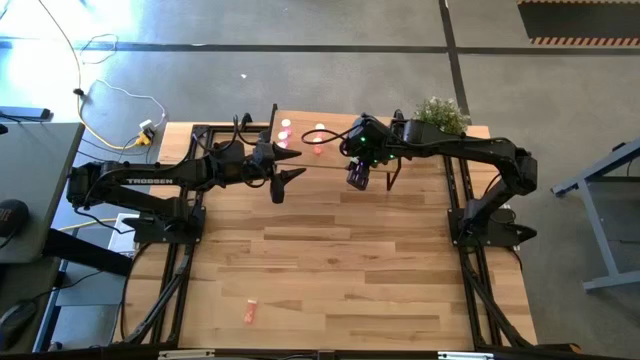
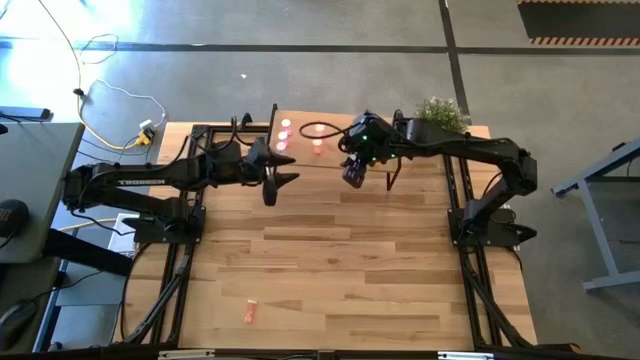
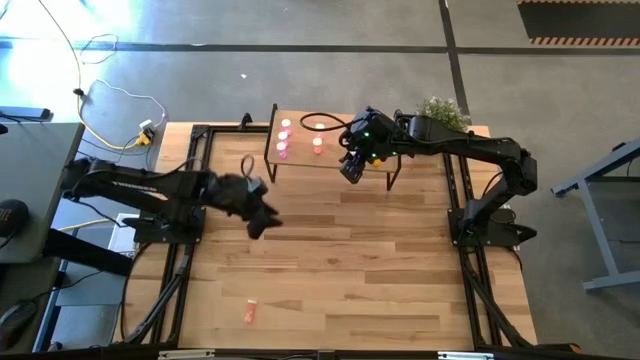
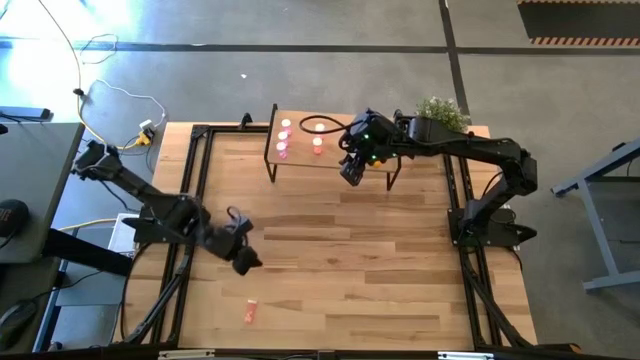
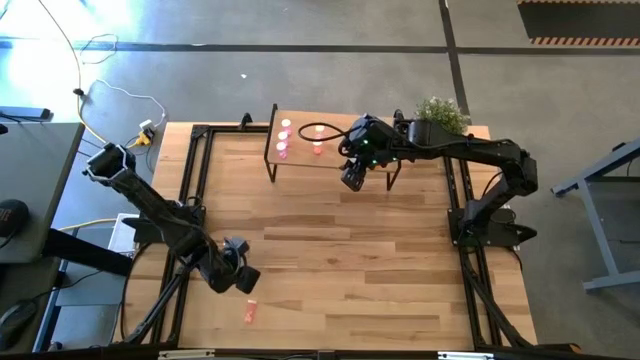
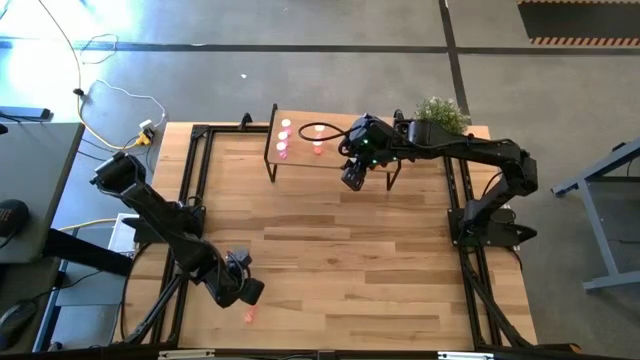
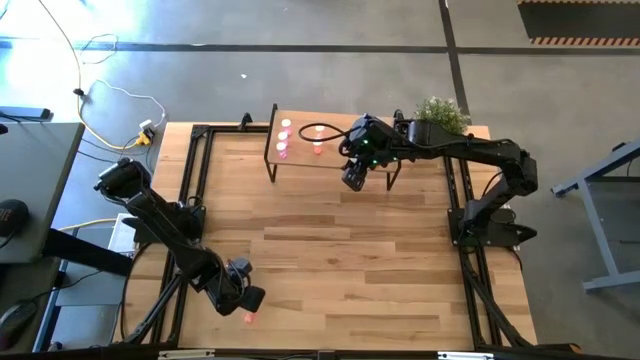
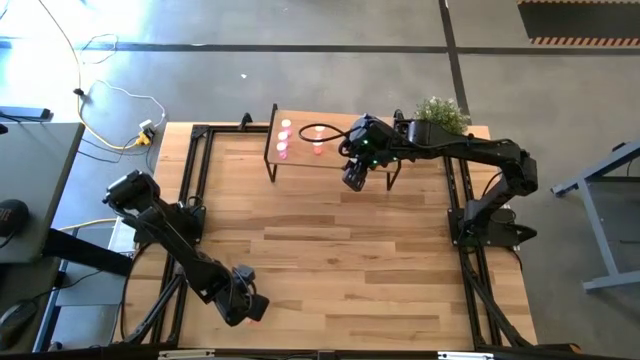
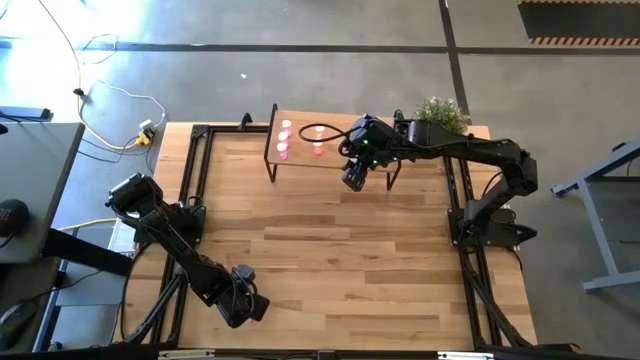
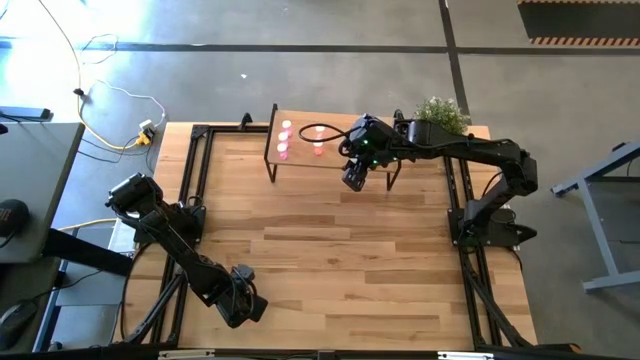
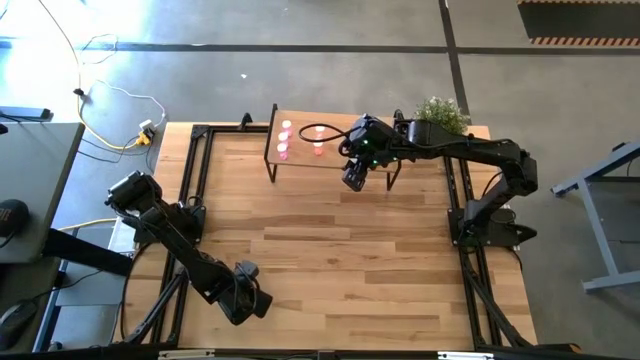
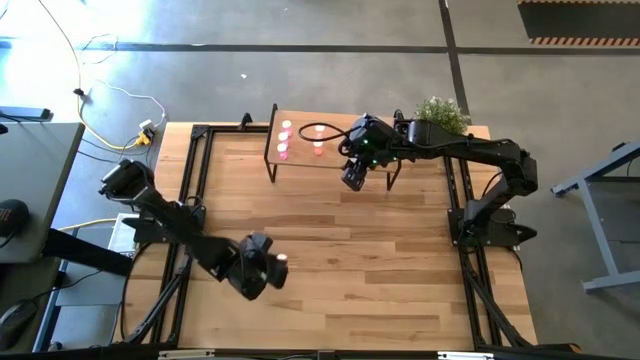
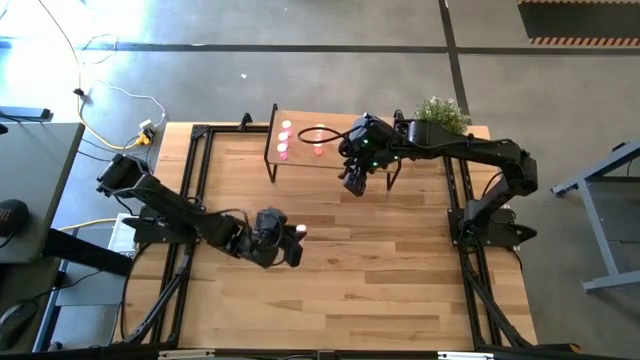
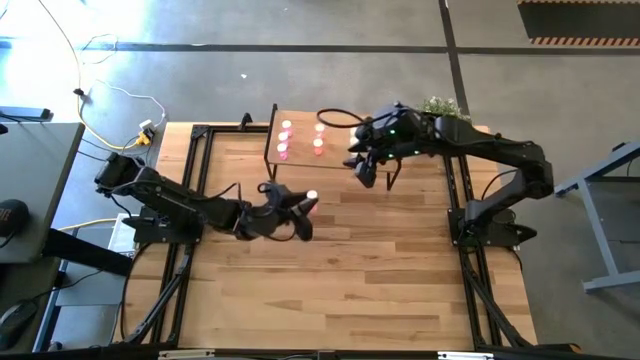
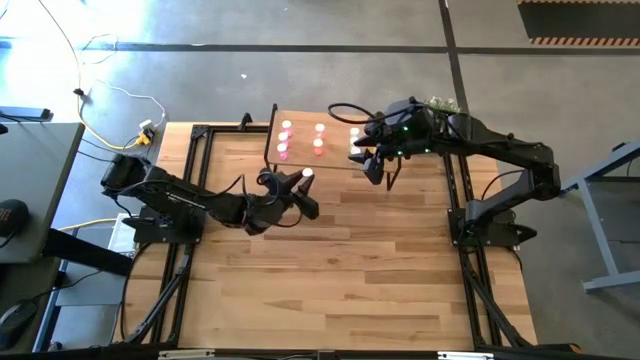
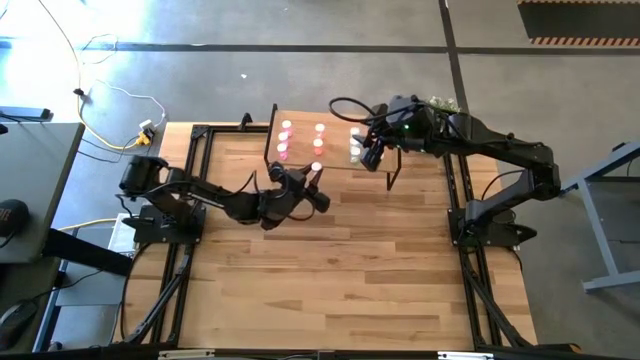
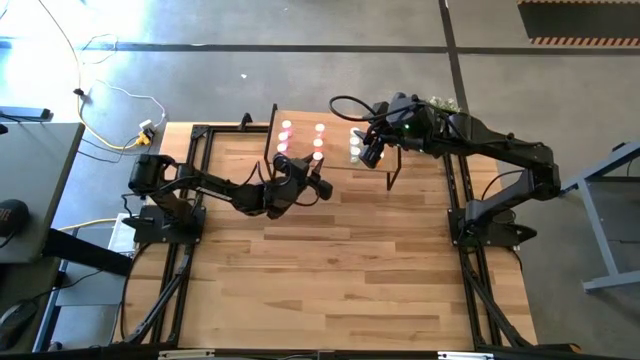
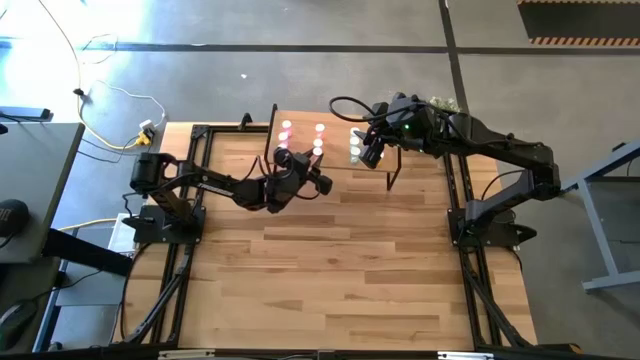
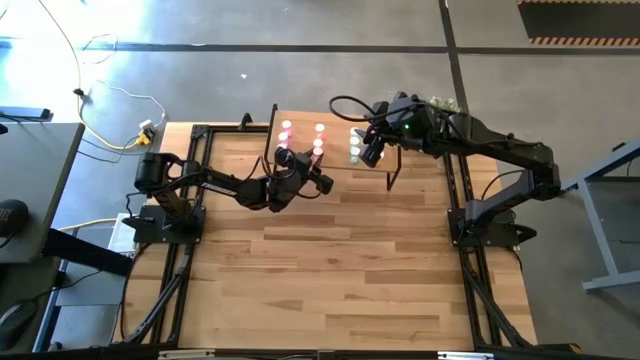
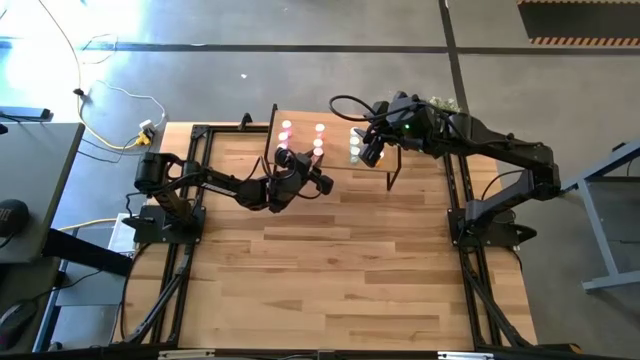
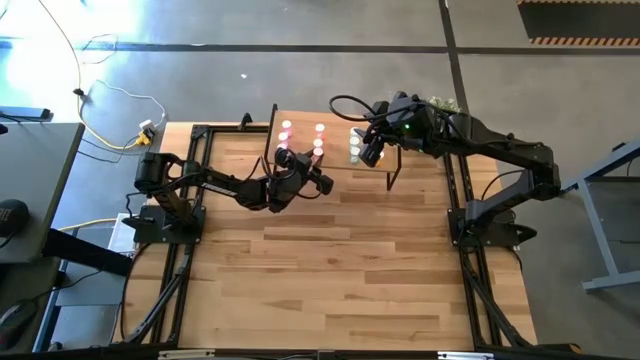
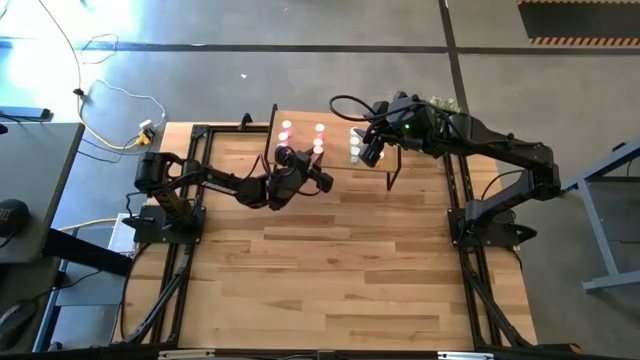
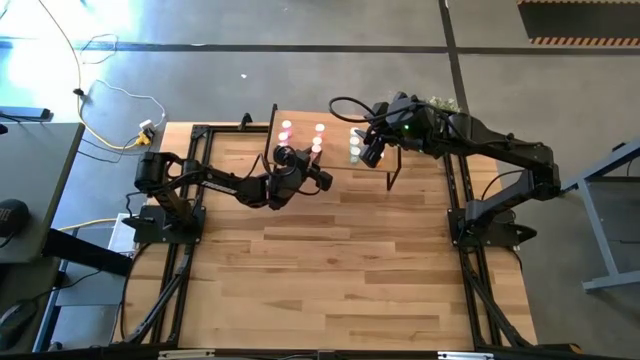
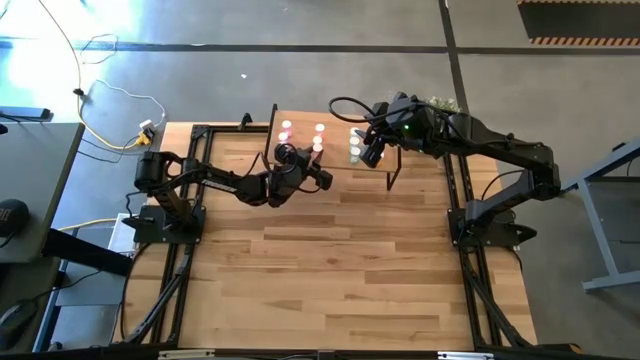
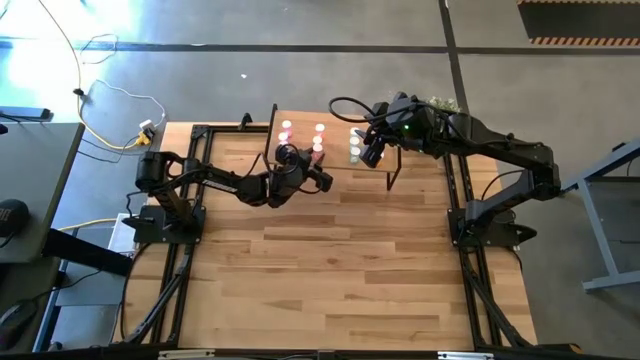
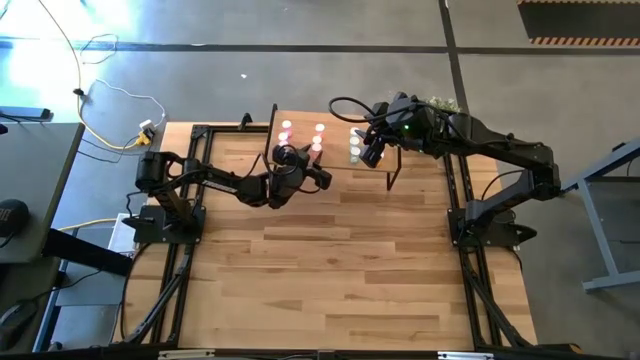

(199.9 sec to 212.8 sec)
Task: Pick and place medicine bottles onto shelf by color
Put the pink pill bottle aligned with the other pink pill bottles on the shelf

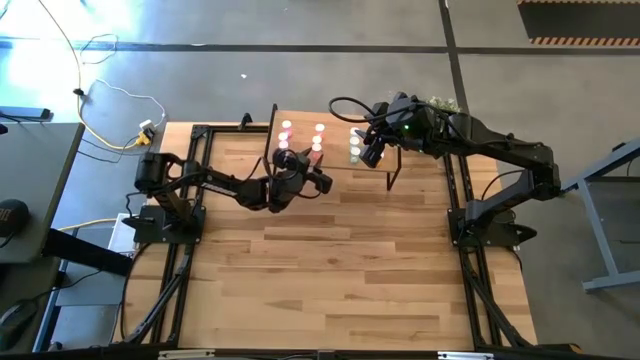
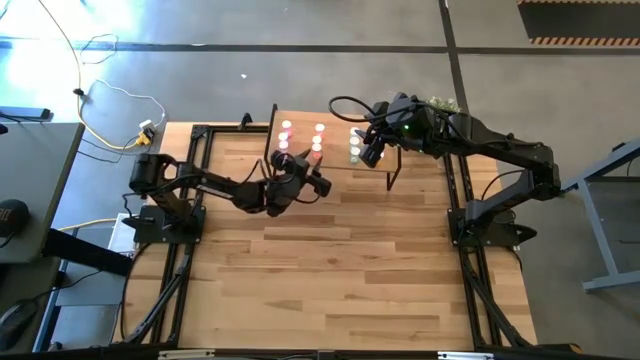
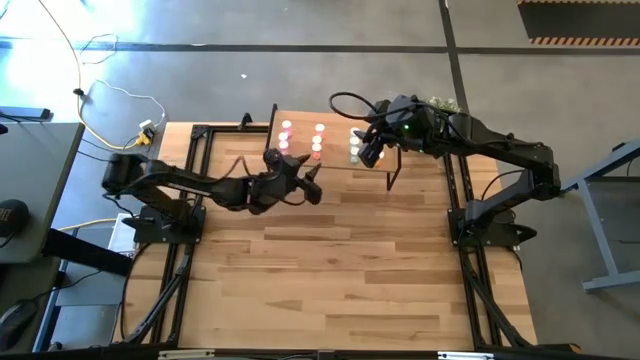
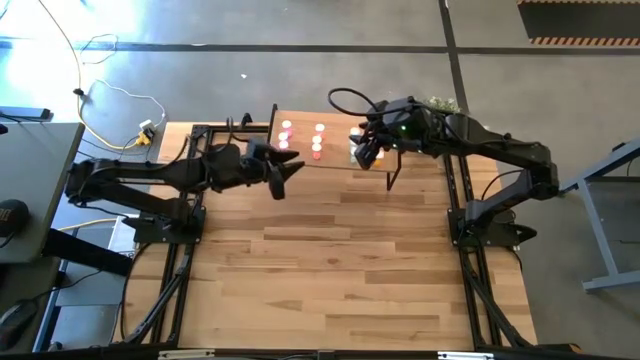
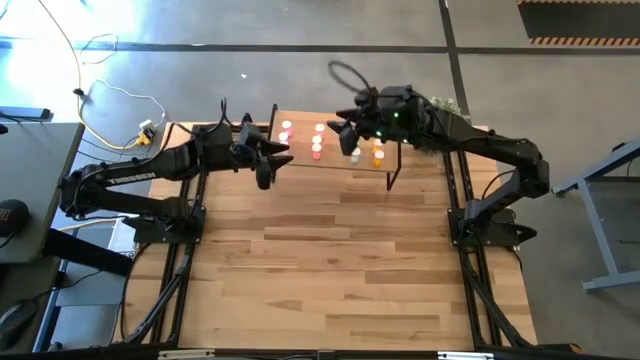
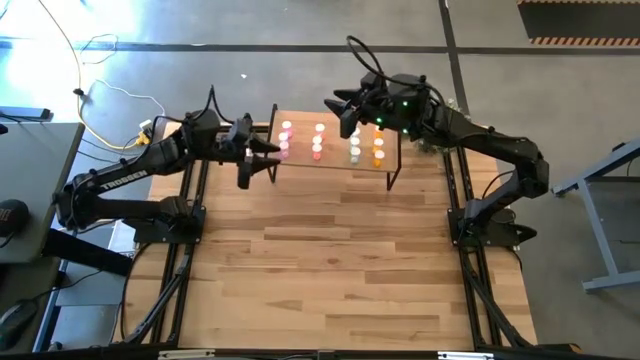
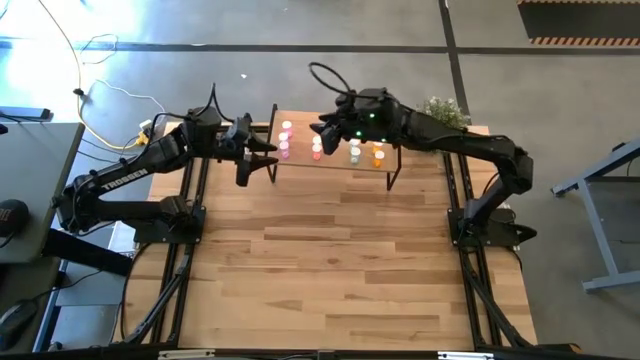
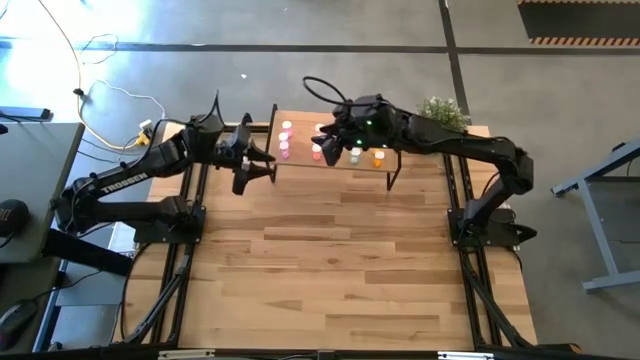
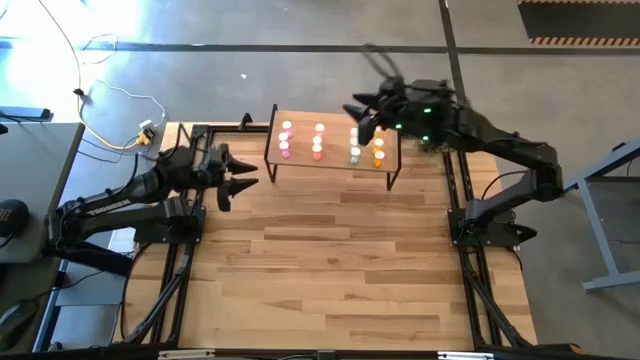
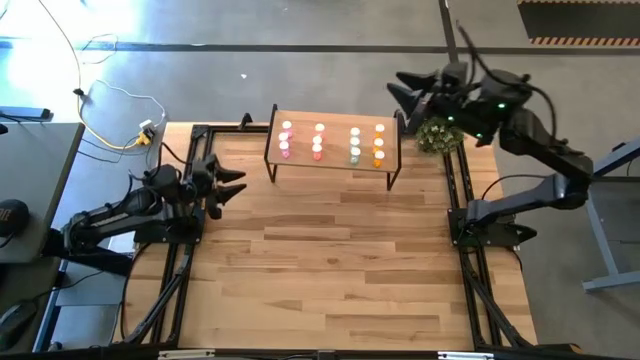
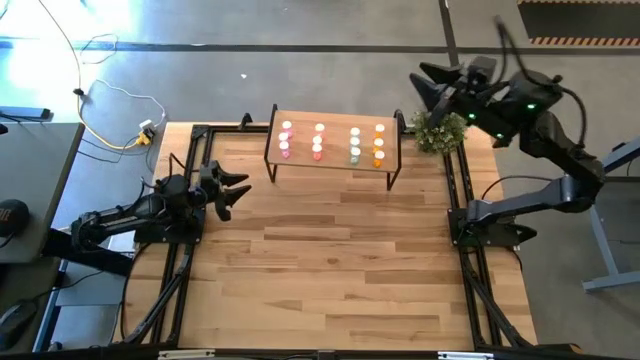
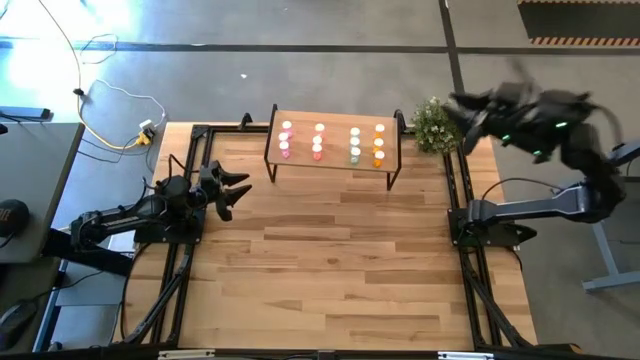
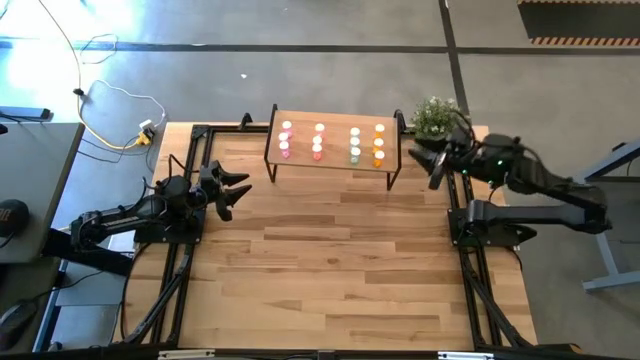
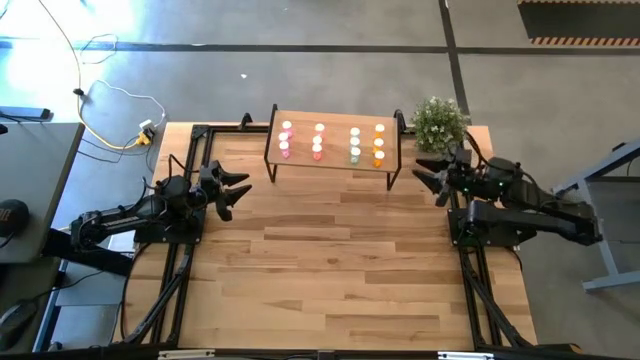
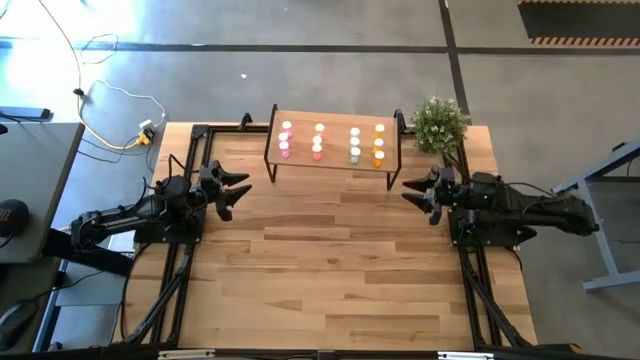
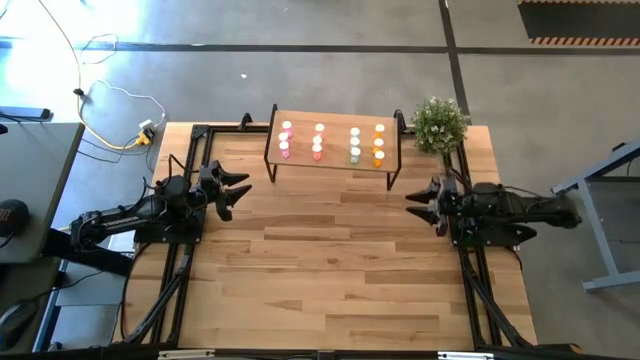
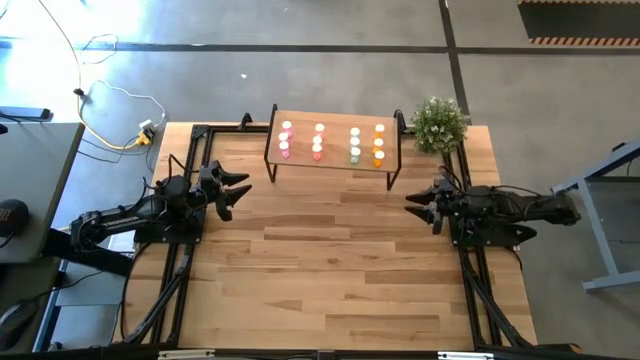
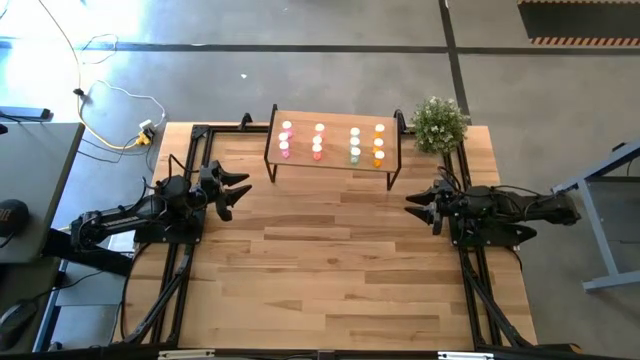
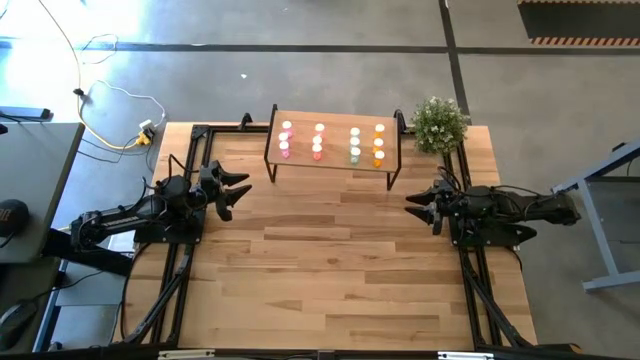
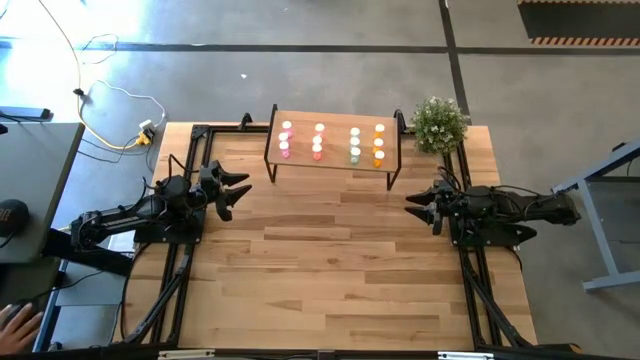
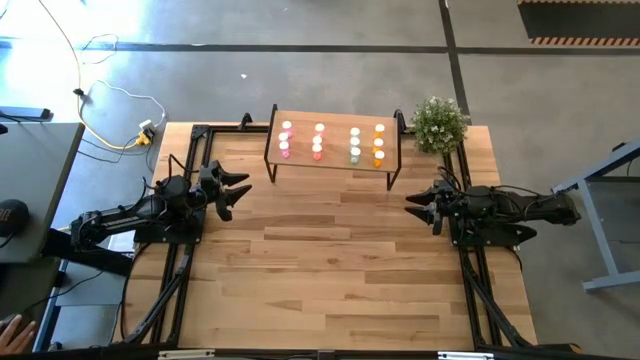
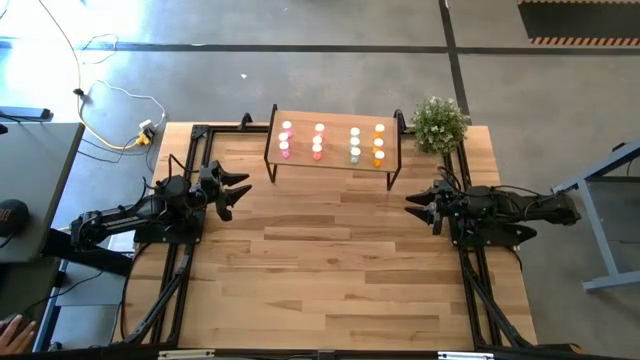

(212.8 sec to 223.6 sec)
Return to Home Position
